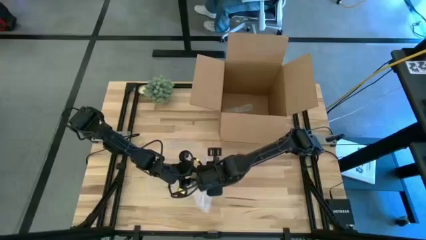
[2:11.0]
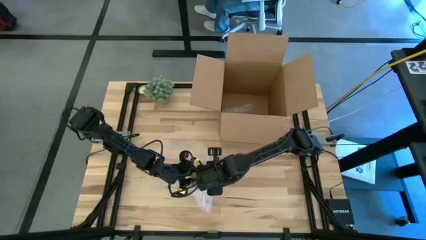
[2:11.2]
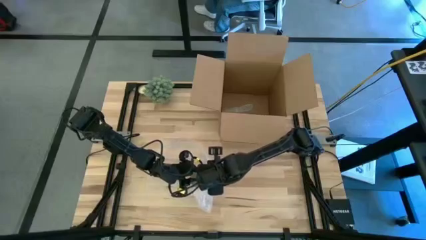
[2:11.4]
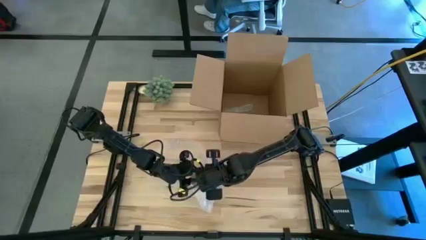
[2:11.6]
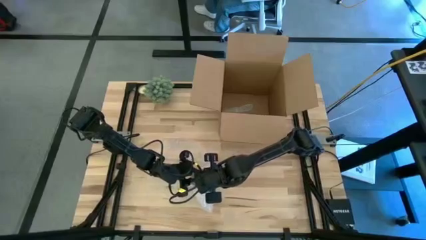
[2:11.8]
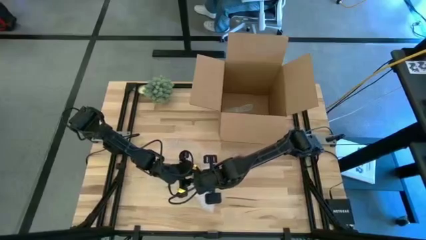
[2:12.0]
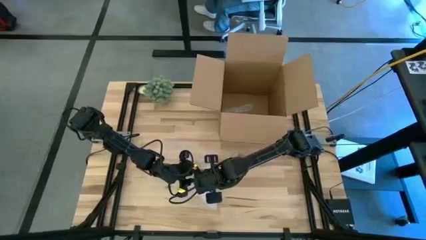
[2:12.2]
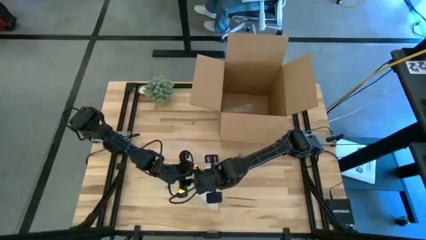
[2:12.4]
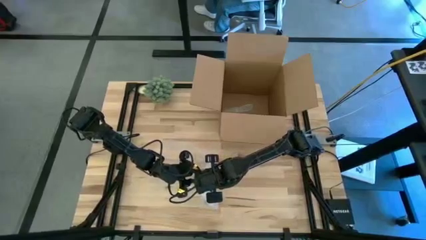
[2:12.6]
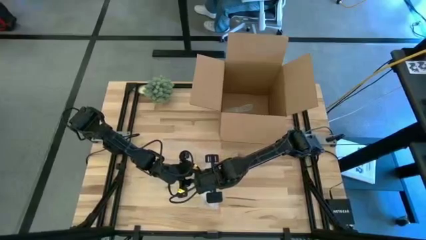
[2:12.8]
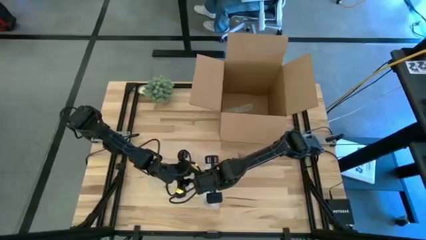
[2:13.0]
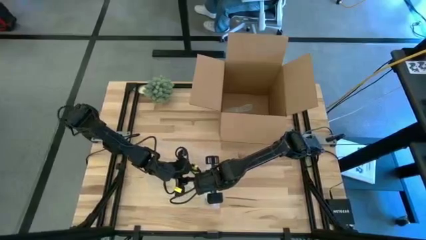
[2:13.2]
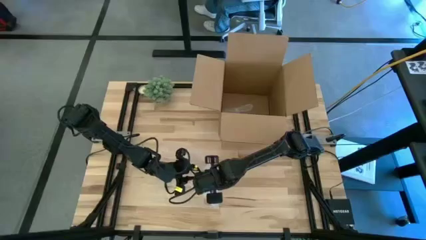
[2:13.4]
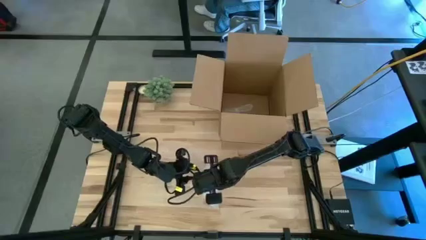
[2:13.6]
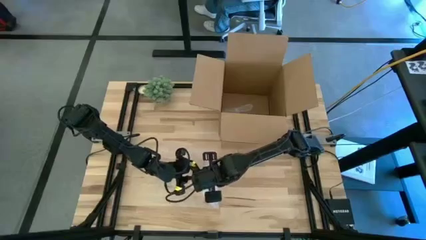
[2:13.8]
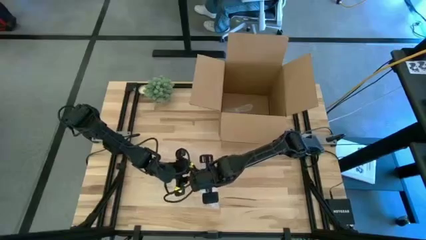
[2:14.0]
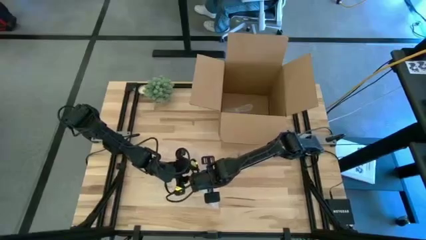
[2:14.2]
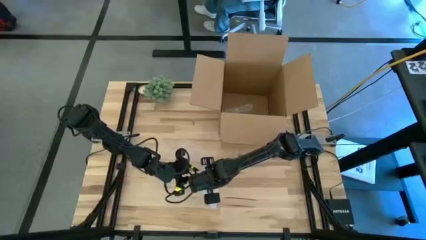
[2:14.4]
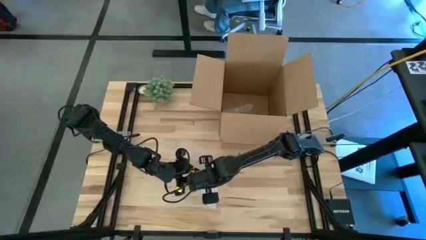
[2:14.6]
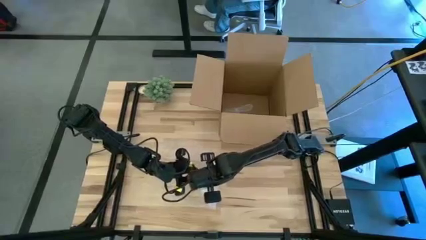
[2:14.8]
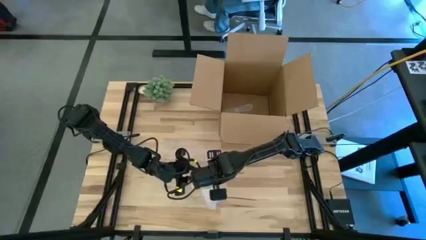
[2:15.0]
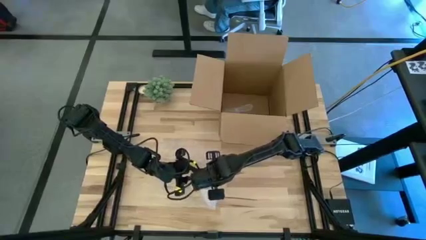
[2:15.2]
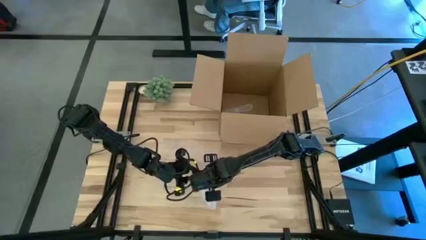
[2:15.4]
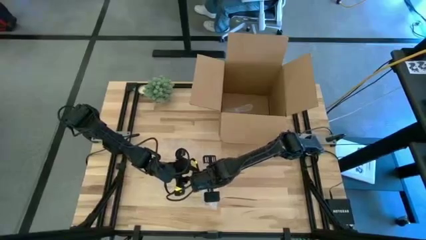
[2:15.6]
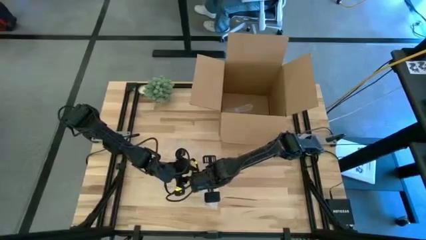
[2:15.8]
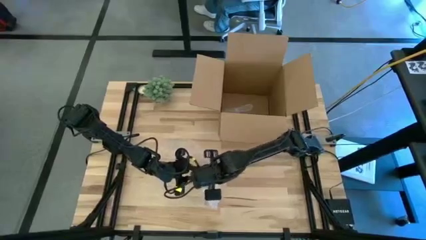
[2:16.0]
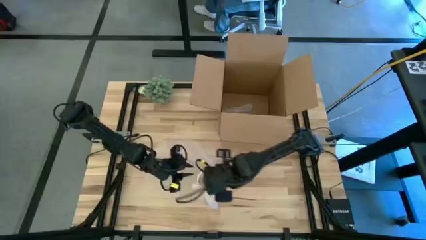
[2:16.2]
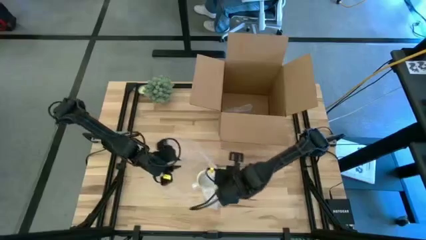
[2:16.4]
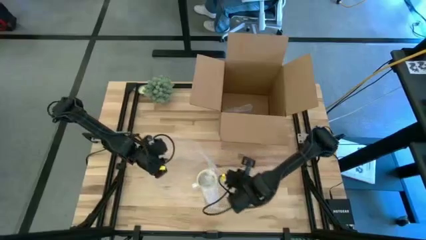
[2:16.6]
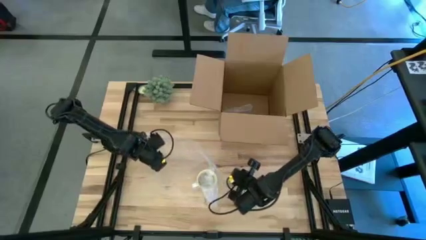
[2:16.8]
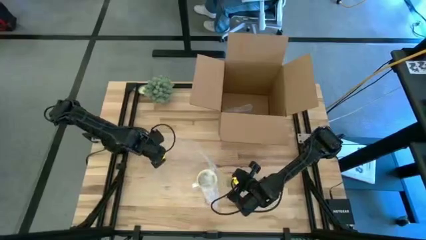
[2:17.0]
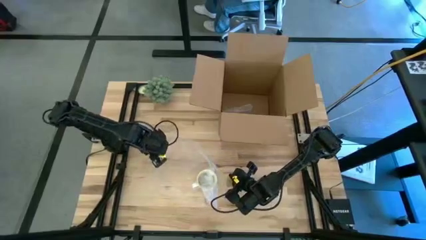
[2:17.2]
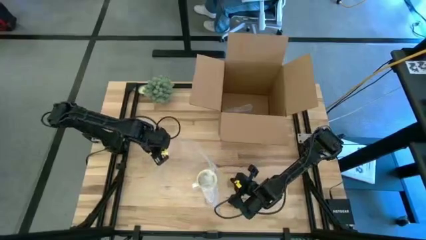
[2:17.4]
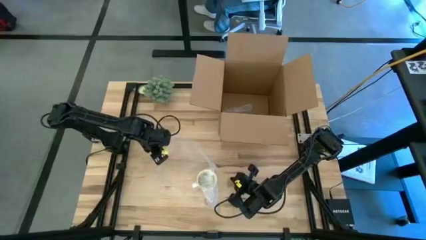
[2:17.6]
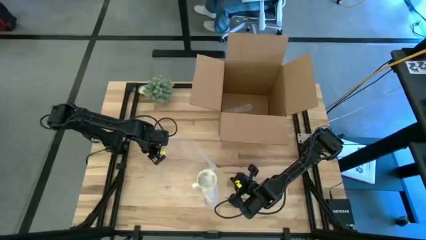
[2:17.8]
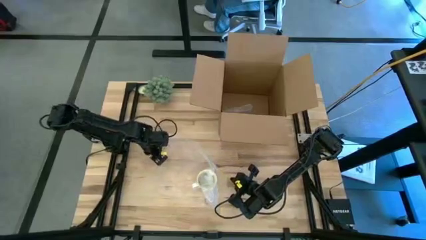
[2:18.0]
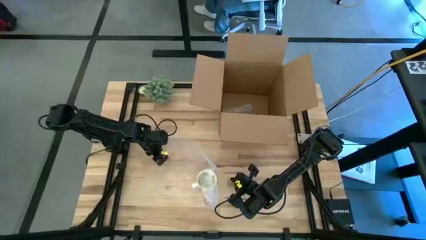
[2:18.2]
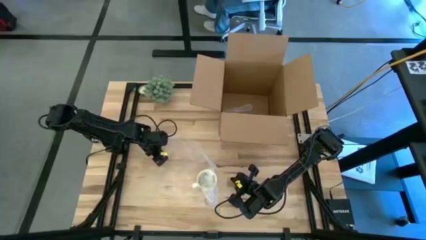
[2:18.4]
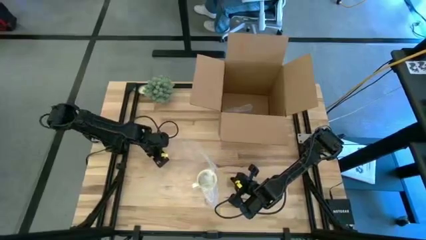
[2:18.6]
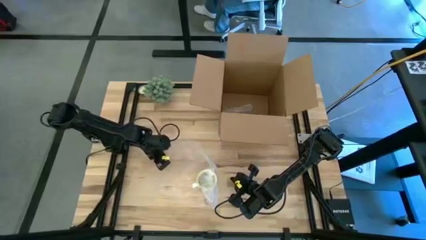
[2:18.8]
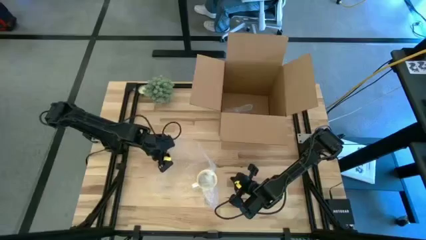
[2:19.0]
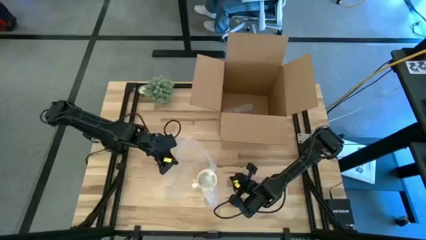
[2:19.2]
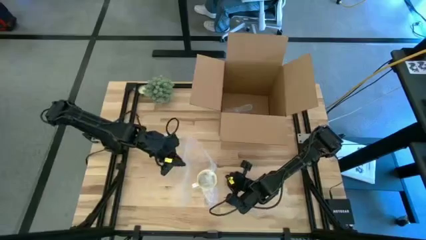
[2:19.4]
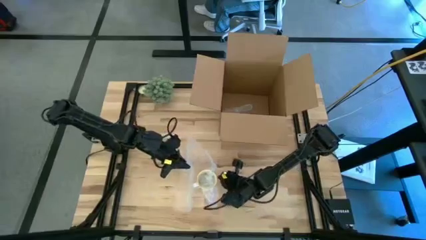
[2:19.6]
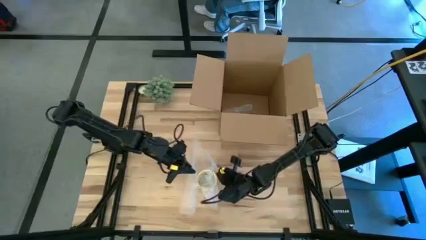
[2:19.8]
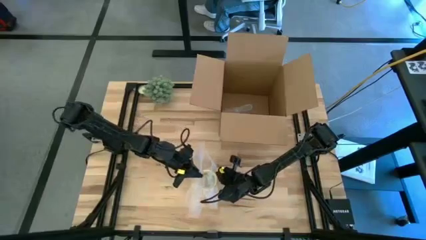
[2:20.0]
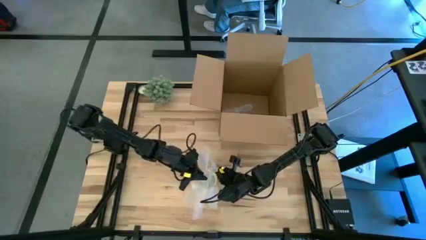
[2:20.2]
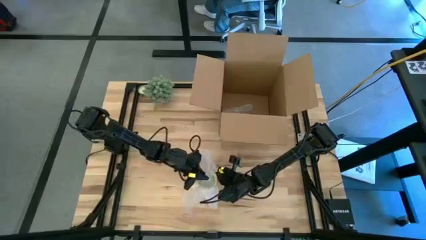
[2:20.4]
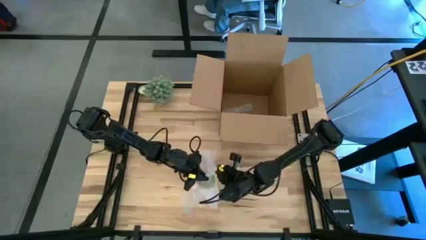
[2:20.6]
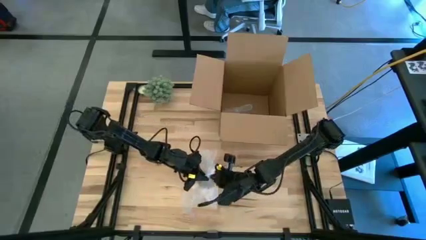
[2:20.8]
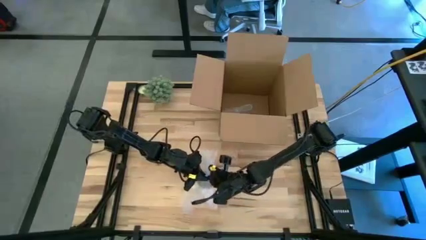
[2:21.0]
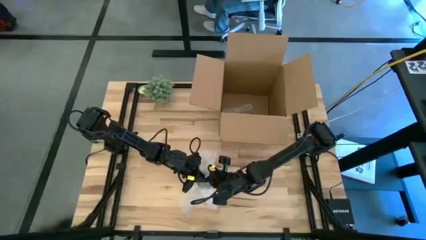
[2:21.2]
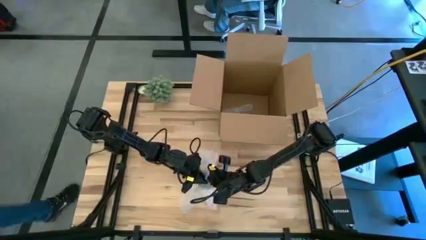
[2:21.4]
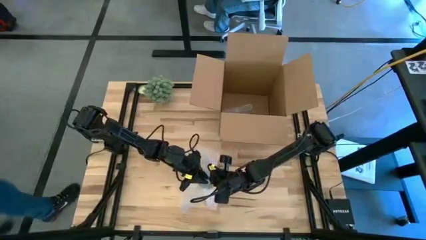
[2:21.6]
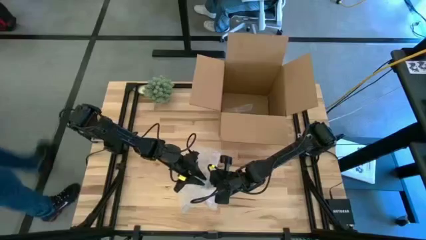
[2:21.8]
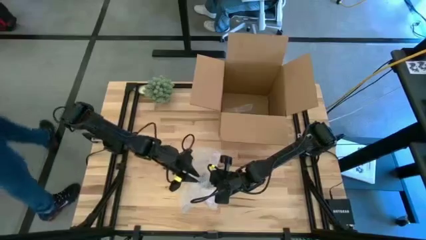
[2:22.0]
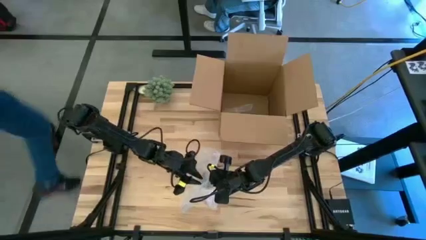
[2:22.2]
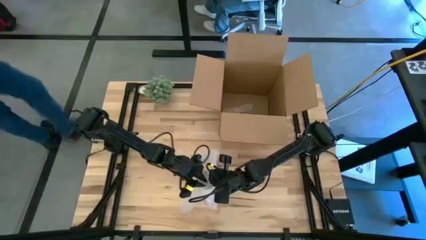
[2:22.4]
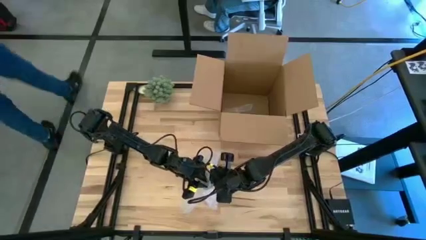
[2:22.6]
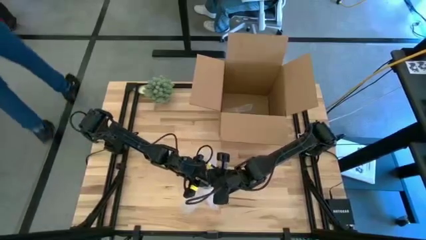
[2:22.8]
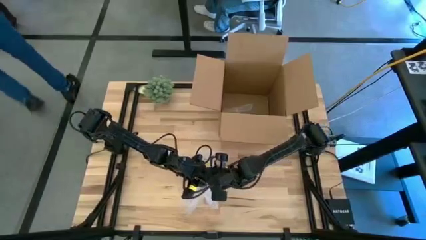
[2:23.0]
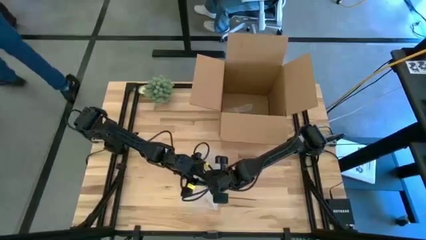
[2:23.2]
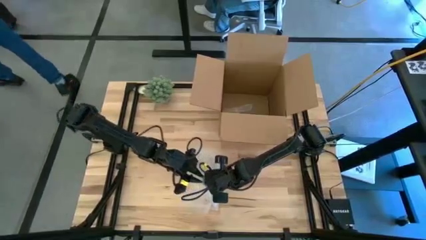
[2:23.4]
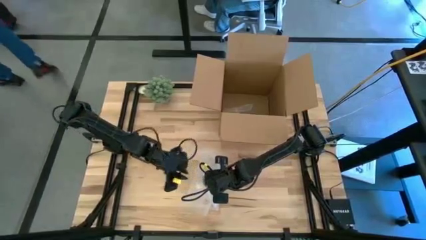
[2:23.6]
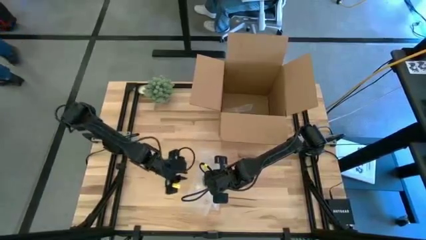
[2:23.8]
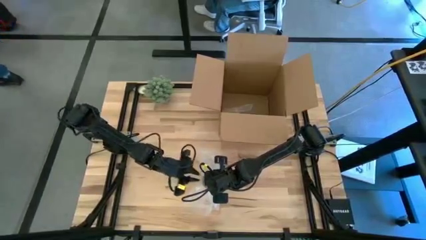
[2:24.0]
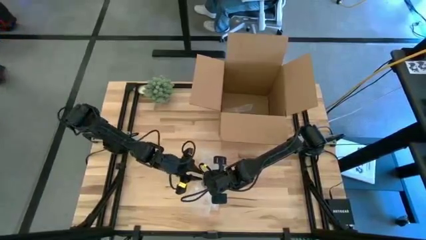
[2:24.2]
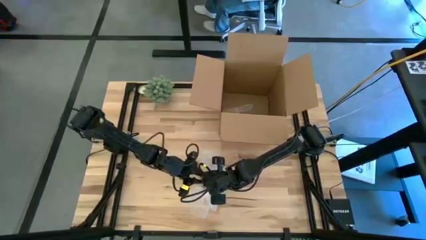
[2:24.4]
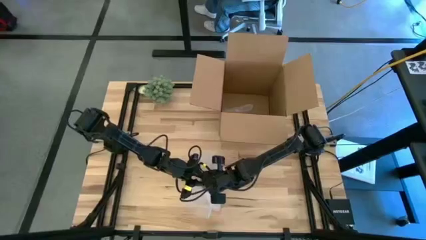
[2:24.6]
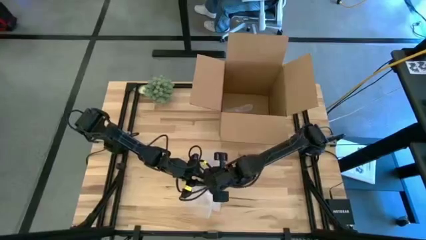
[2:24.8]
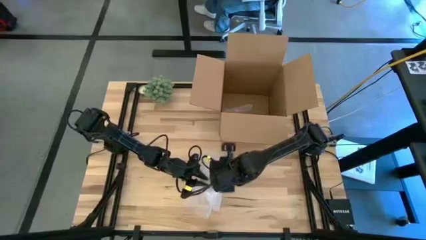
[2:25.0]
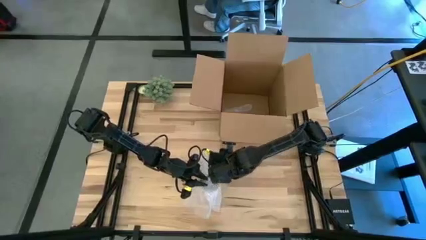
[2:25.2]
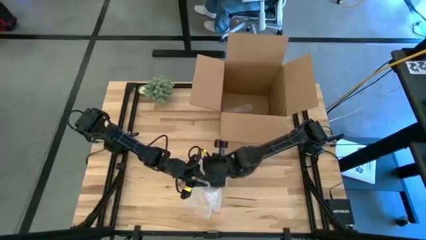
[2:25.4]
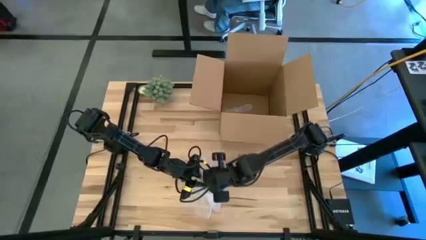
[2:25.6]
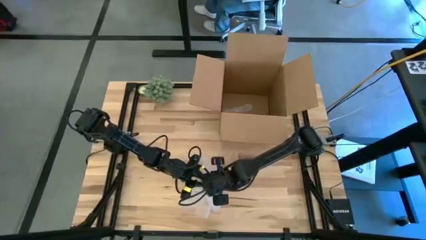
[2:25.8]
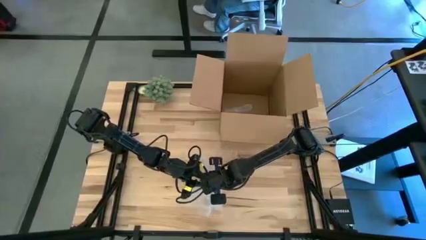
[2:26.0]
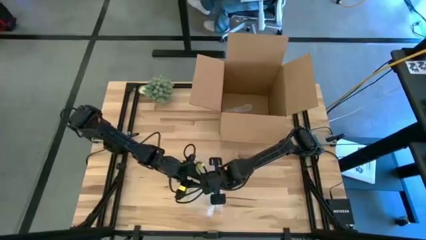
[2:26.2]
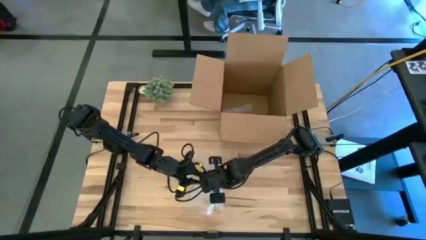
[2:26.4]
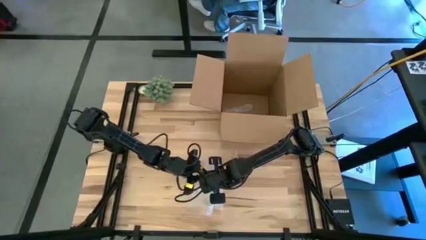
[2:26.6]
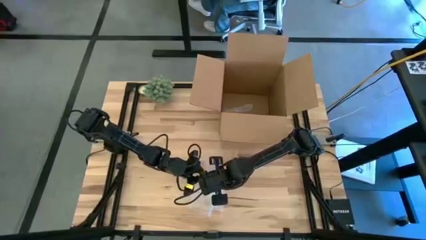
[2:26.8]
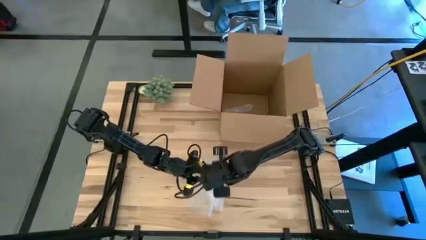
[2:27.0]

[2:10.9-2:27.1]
Task: wrap mug
Wrap the orange patterned mug with the bubble wrap
